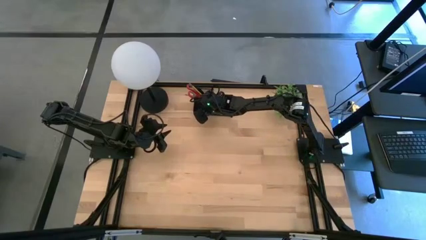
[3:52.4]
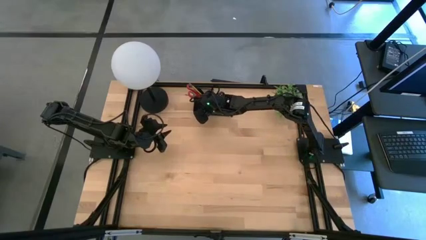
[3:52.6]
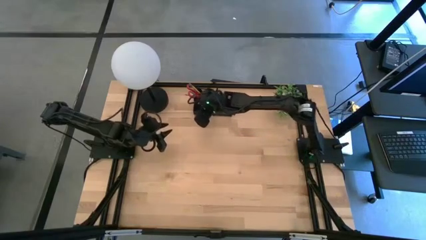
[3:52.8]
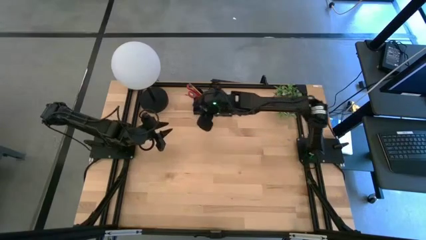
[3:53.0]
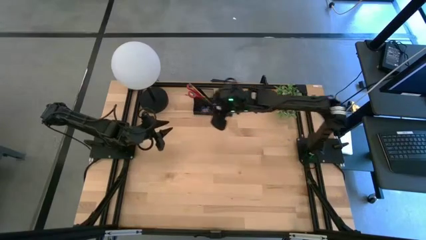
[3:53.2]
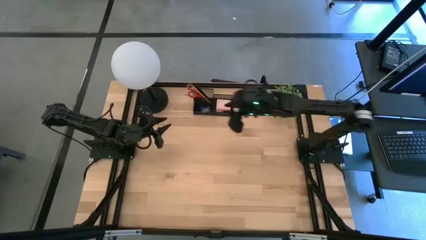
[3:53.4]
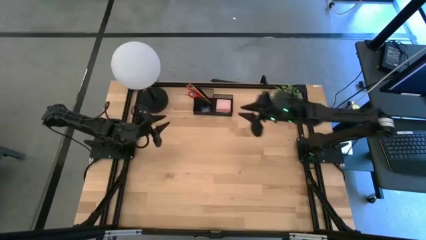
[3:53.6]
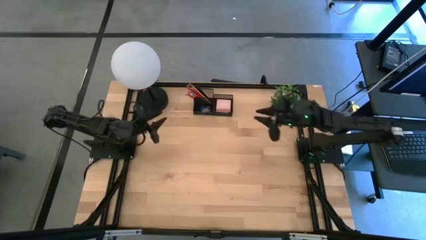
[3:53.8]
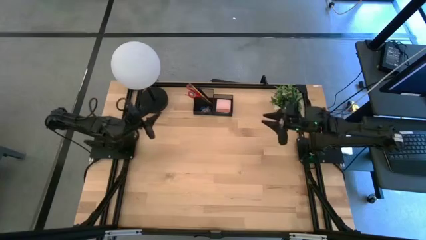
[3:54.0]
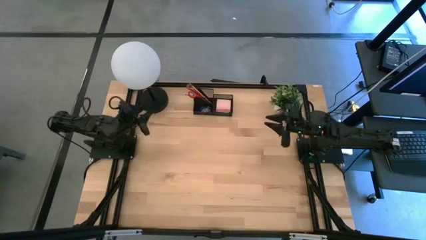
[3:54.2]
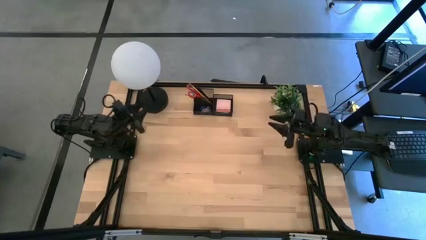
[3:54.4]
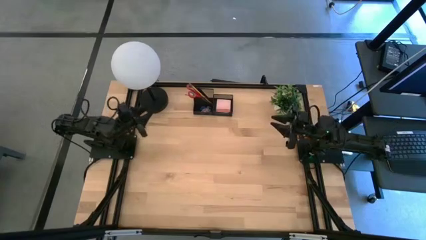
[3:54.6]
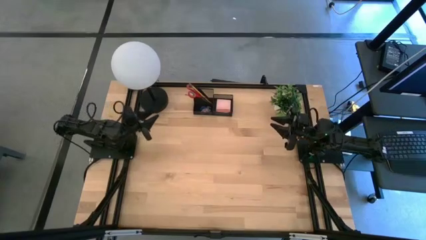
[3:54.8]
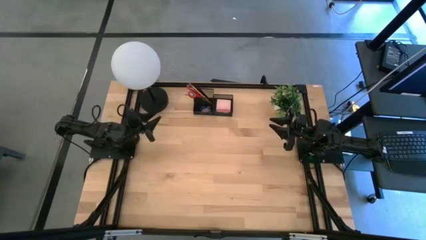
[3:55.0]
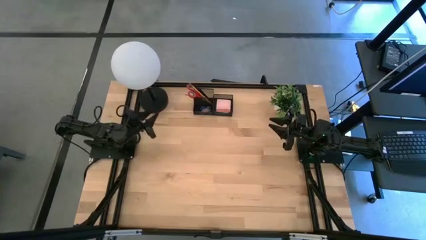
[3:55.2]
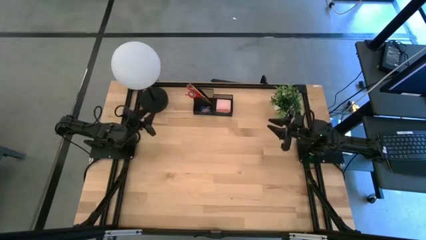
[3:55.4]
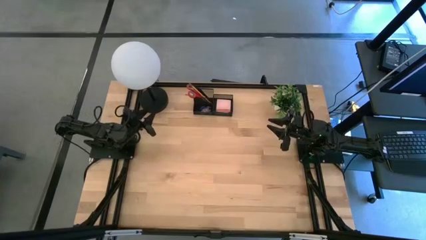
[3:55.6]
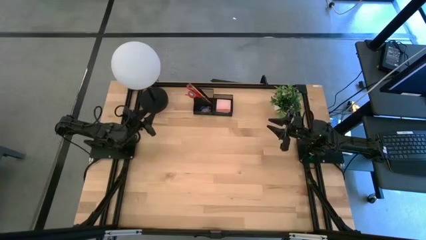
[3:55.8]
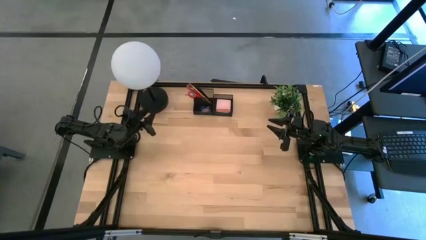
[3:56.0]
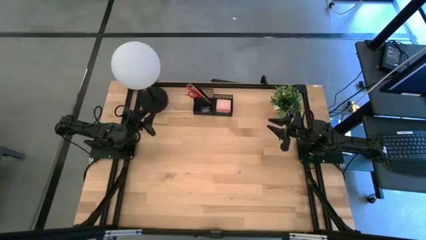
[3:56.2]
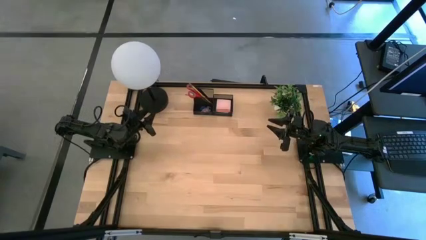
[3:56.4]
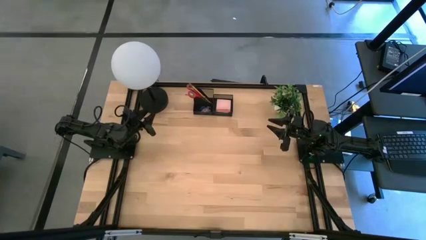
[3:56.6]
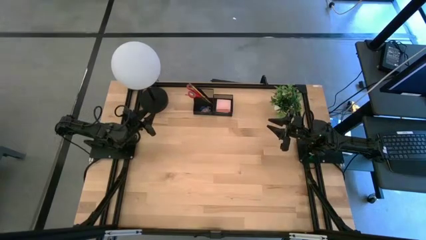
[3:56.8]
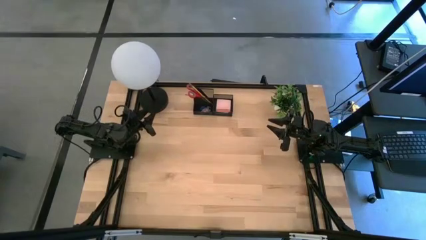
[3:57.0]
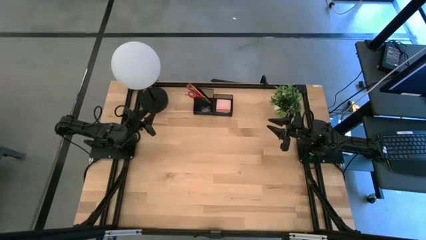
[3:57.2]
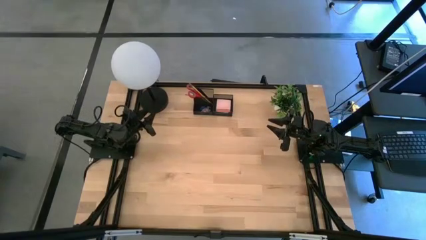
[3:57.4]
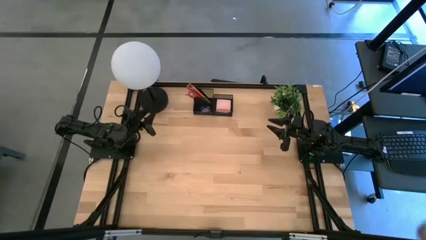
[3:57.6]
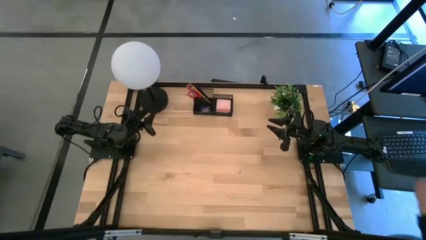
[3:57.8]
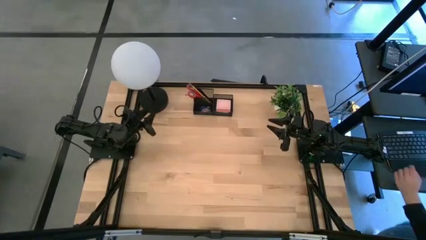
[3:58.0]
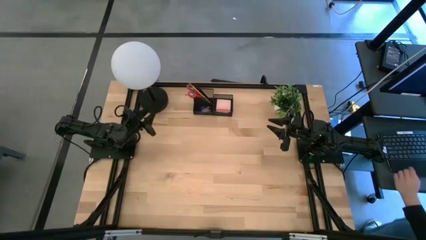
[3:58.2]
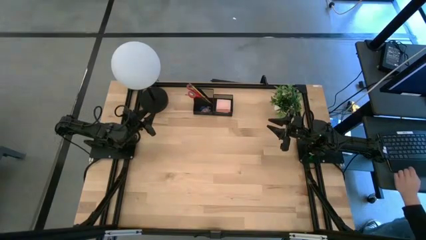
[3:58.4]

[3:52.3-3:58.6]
Task: Pick and place office supplies into organizer
Return to Home Position

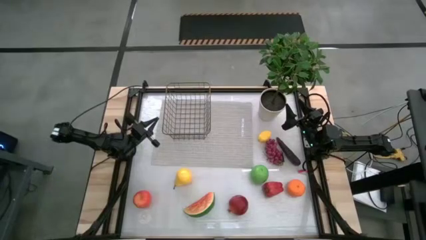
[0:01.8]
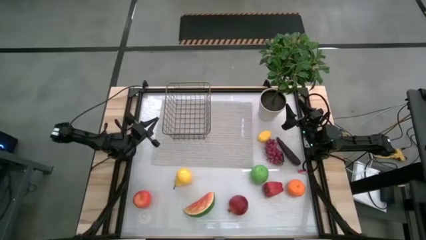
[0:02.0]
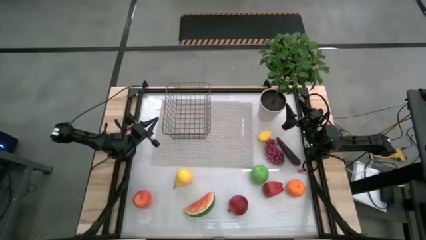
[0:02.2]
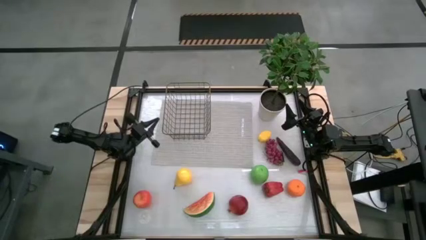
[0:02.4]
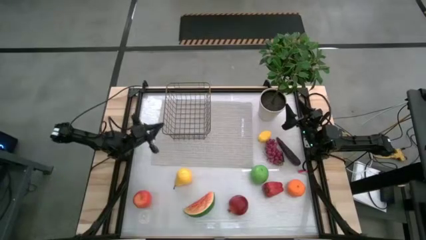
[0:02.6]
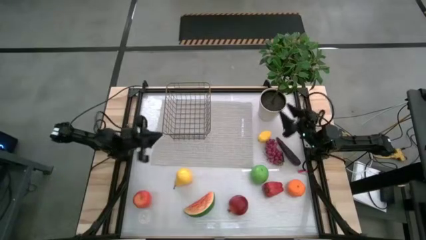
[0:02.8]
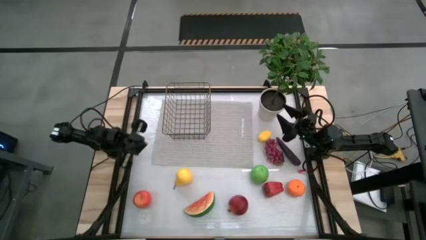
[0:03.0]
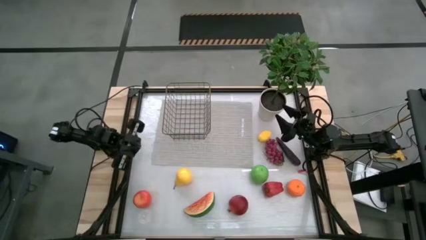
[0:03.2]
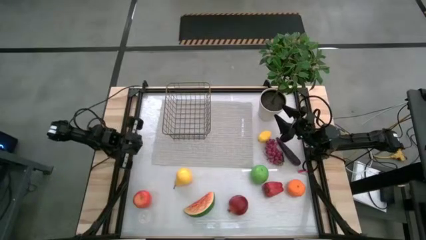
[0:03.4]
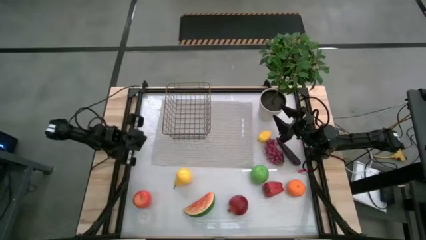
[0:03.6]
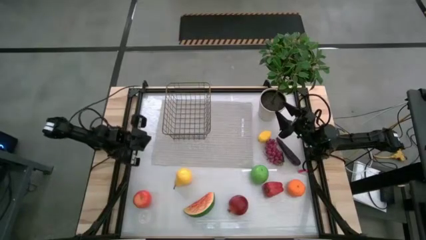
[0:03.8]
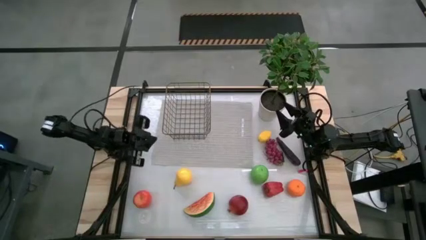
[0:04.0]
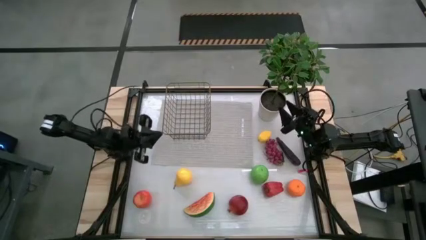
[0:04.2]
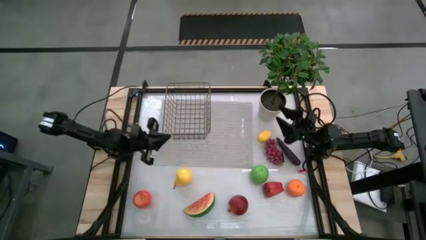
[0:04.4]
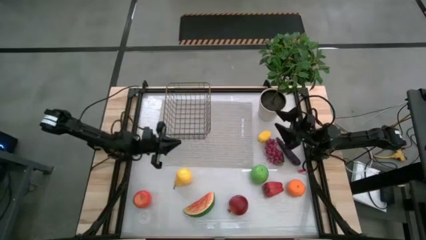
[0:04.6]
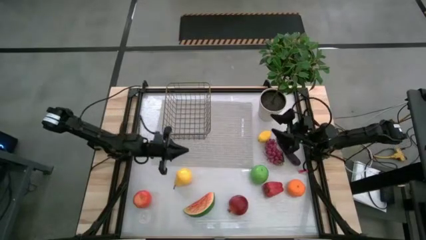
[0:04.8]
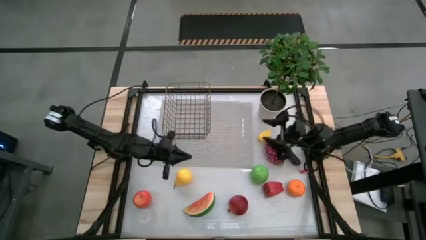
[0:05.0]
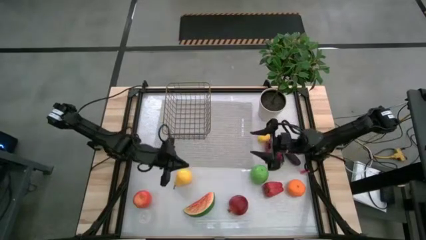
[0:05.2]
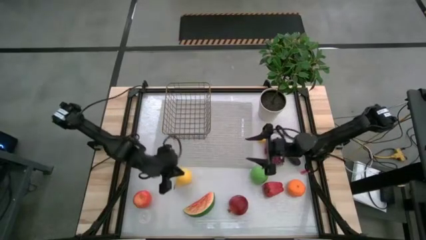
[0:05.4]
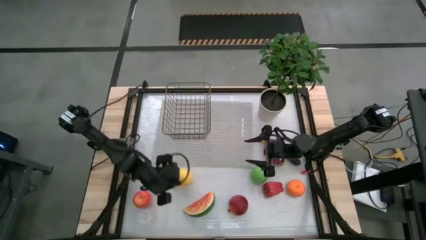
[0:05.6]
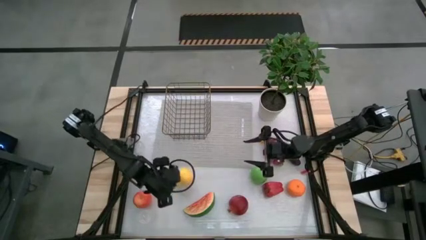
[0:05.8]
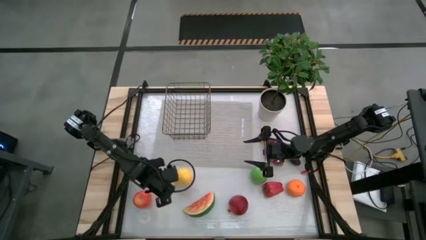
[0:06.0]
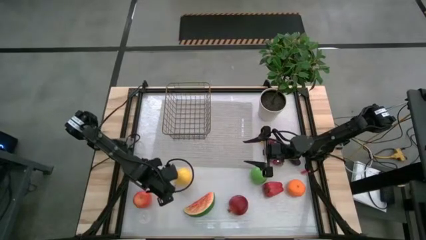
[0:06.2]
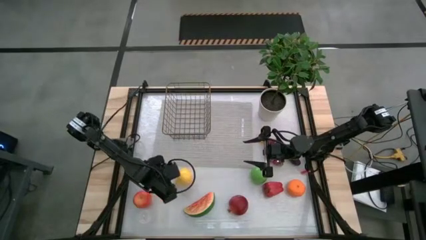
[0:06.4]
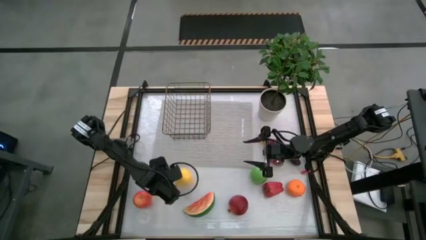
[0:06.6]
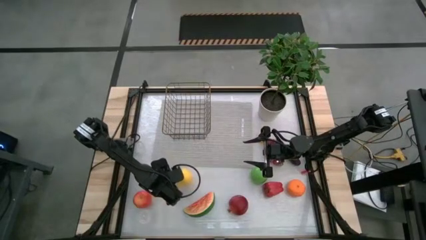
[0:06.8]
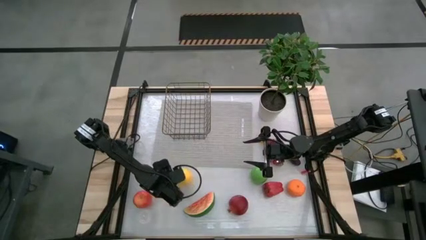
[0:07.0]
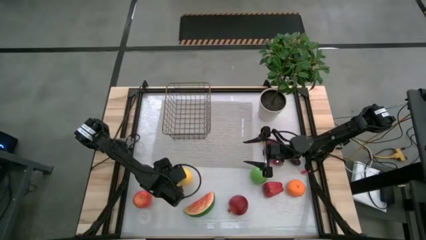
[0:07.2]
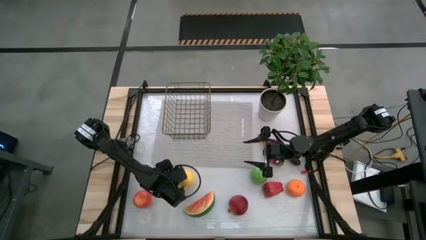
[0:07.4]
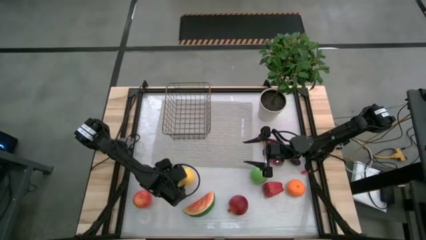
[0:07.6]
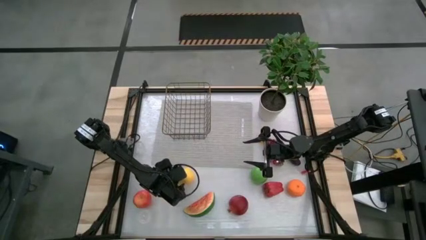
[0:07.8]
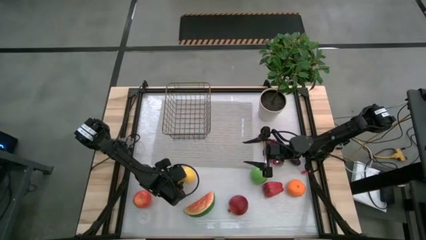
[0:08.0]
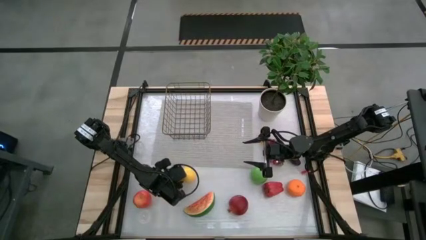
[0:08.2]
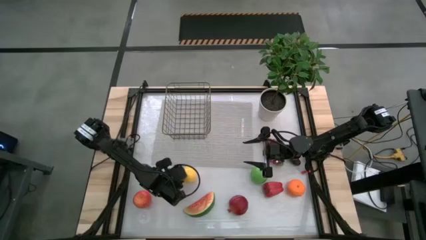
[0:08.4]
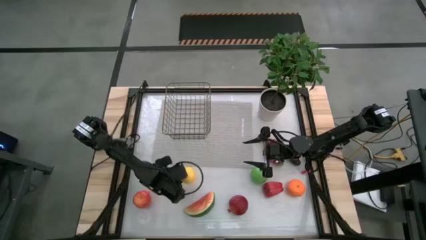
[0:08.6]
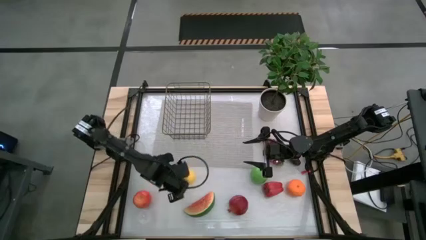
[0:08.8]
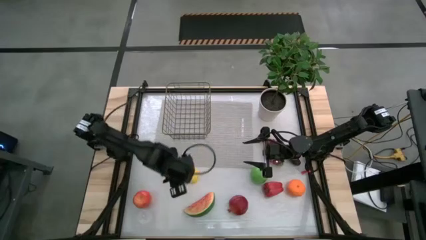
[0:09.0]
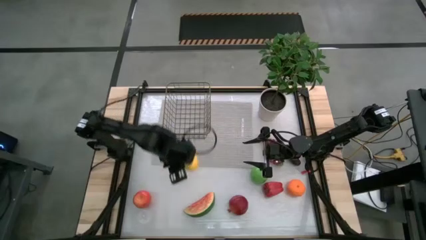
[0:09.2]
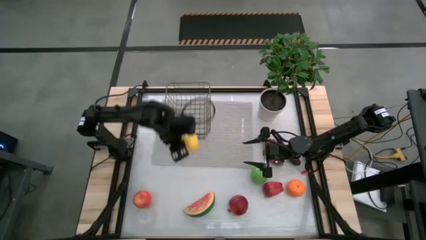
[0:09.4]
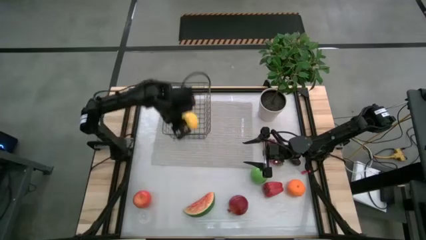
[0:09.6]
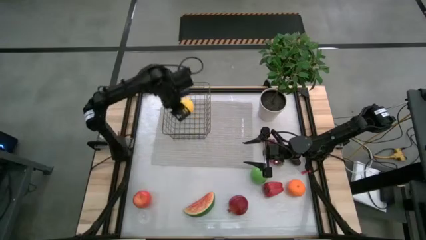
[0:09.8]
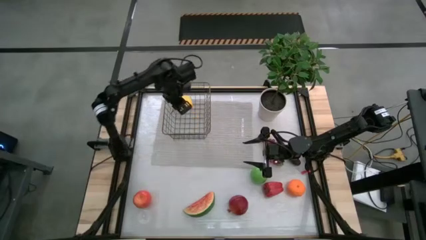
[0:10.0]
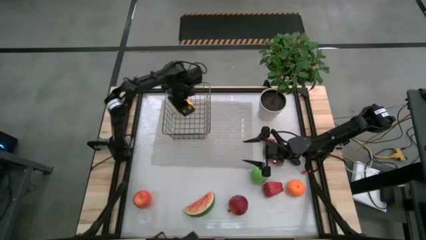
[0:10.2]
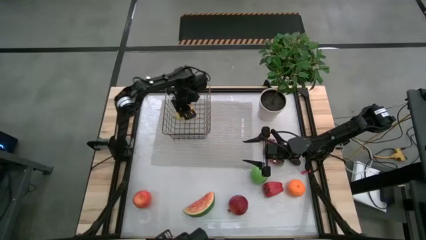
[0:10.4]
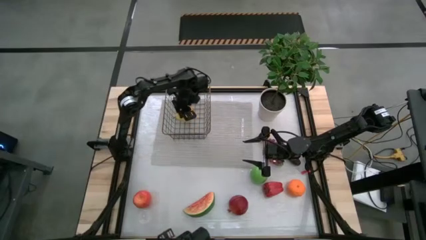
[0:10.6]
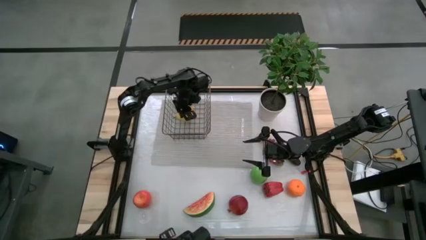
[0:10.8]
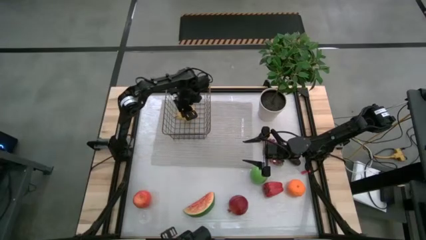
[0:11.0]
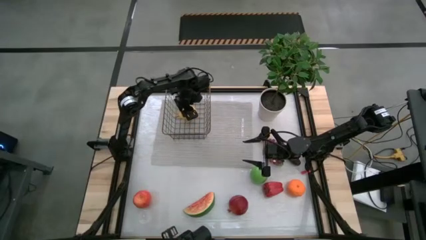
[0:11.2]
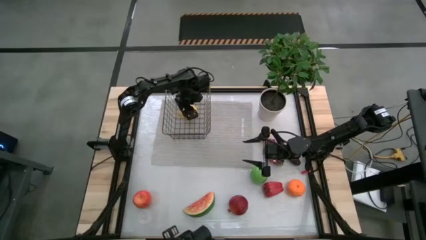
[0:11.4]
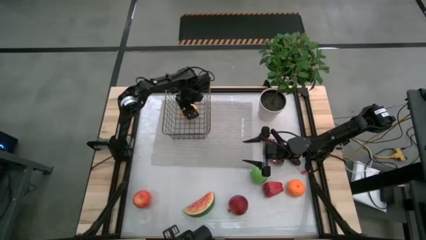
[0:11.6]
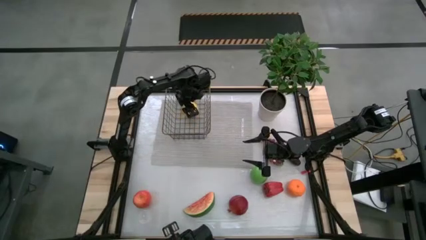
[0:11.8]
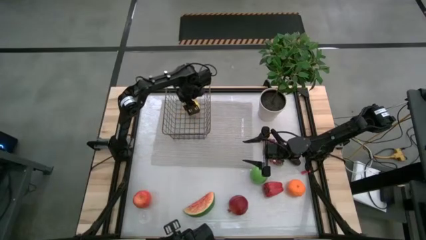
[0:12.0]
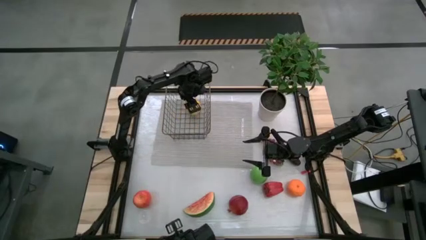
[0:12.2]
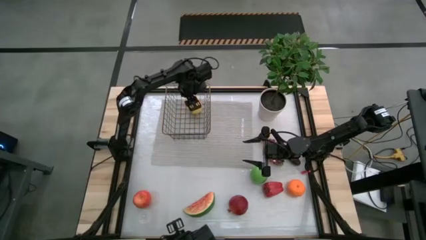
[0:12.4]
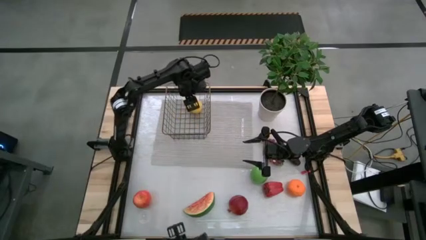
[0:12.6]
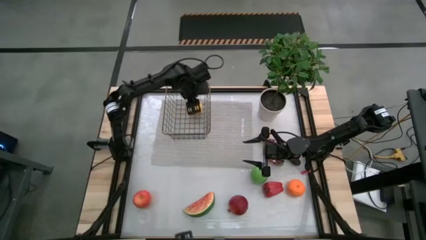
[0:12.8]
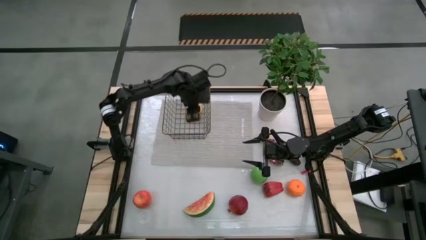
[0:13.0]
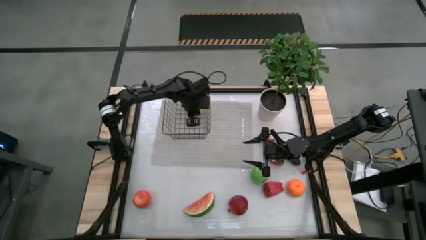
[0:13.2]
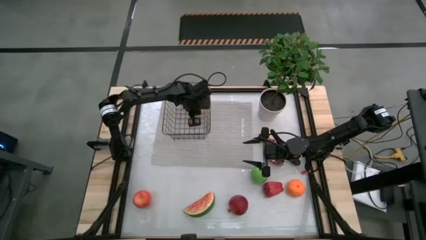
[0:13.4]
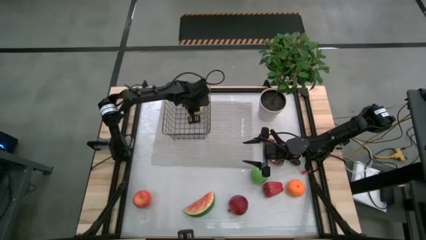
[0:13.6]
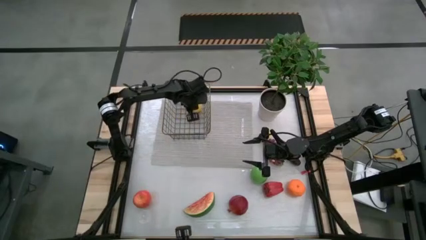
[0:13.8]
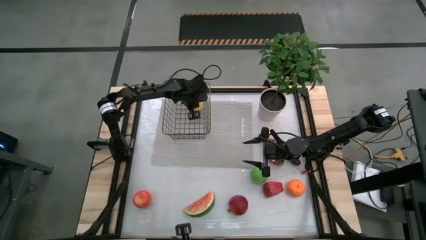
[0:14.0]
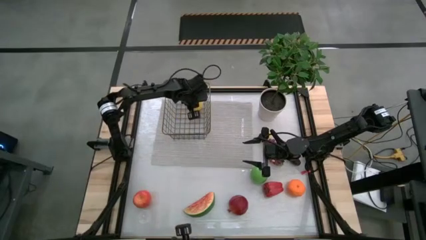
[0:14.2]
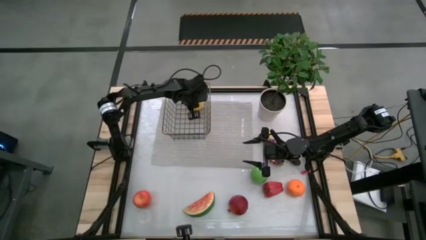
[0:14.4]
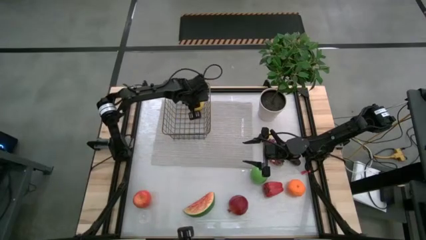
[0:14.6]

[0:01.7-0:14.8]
Task: Build produce basket
Put the yellow pear into the brown wire basket
